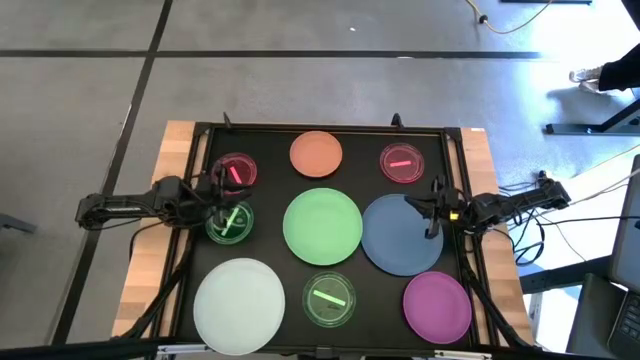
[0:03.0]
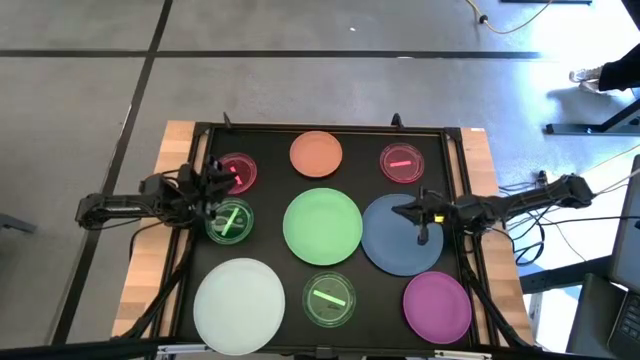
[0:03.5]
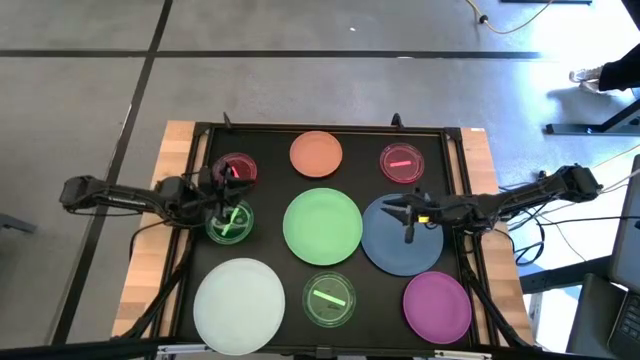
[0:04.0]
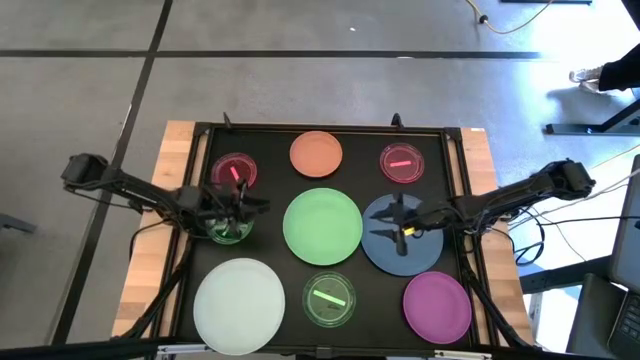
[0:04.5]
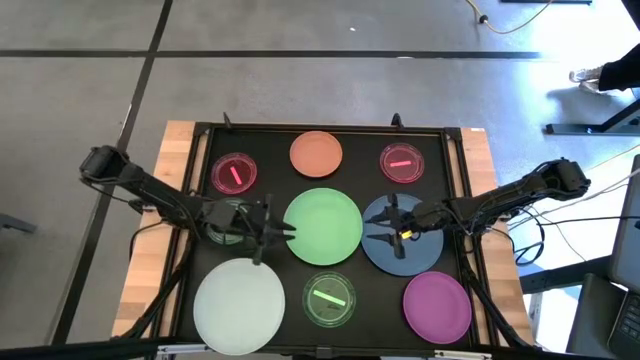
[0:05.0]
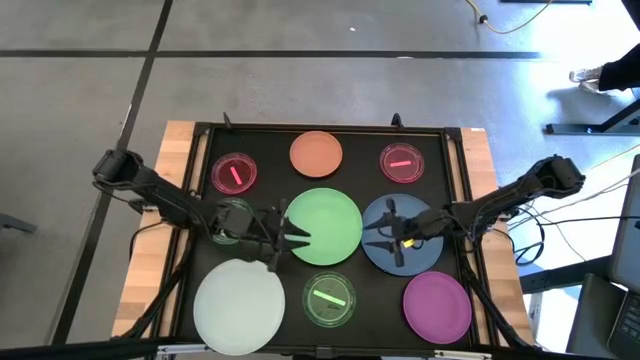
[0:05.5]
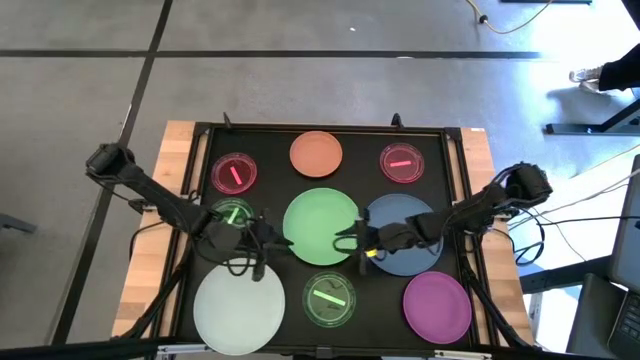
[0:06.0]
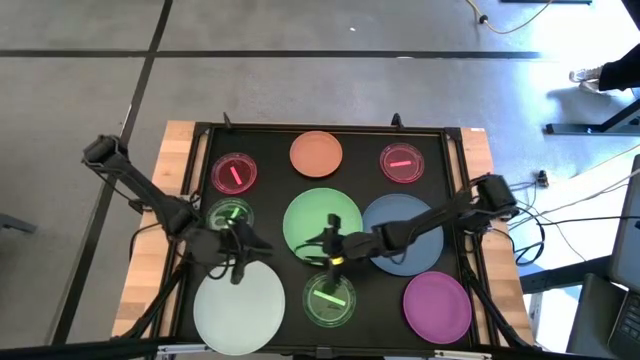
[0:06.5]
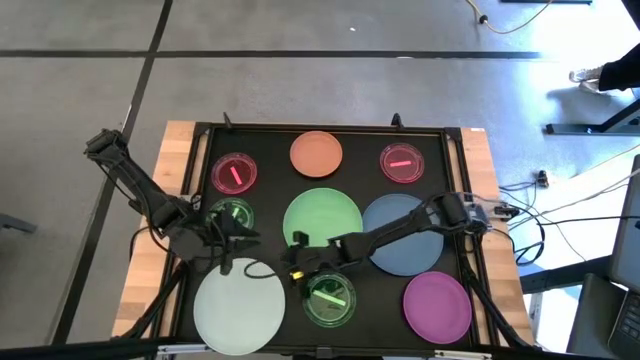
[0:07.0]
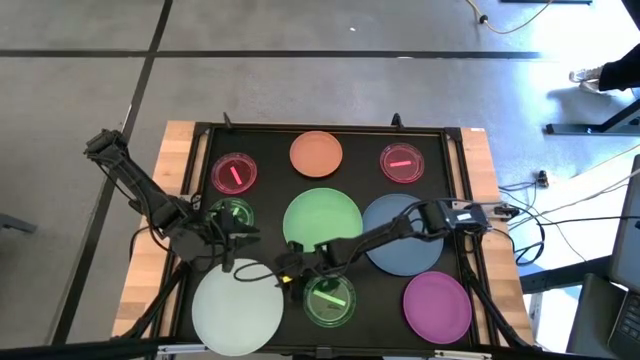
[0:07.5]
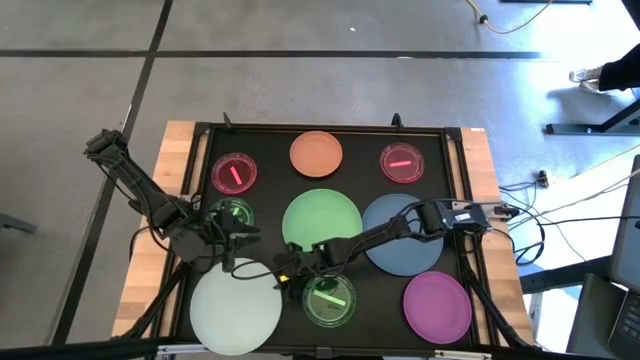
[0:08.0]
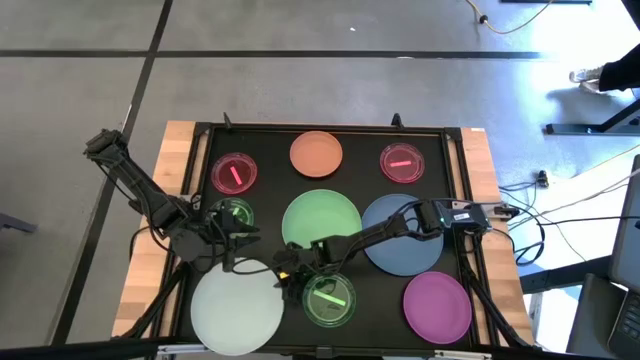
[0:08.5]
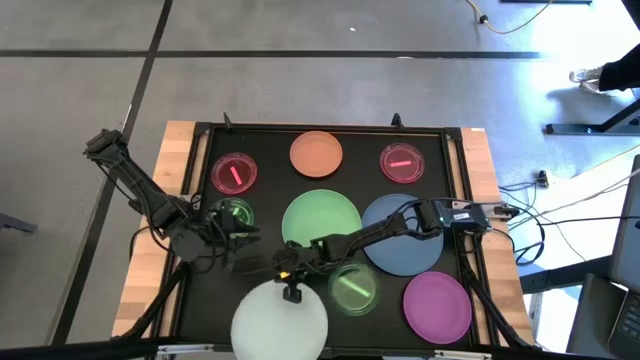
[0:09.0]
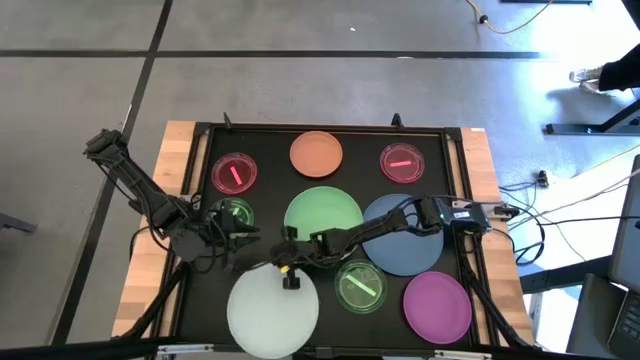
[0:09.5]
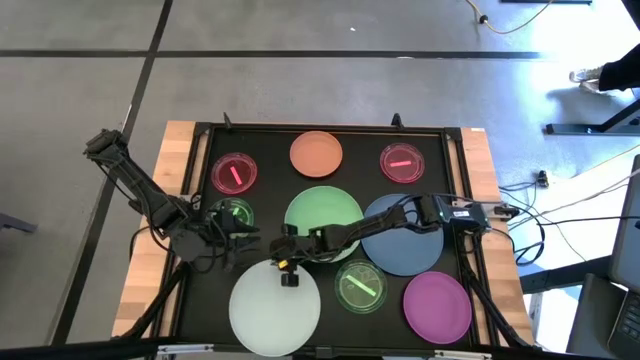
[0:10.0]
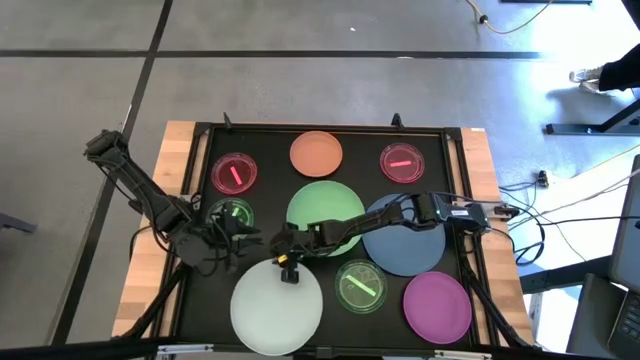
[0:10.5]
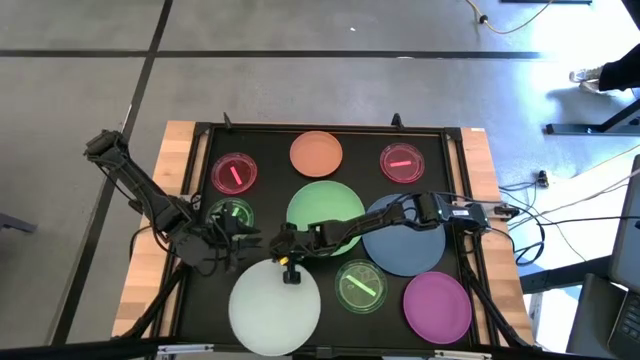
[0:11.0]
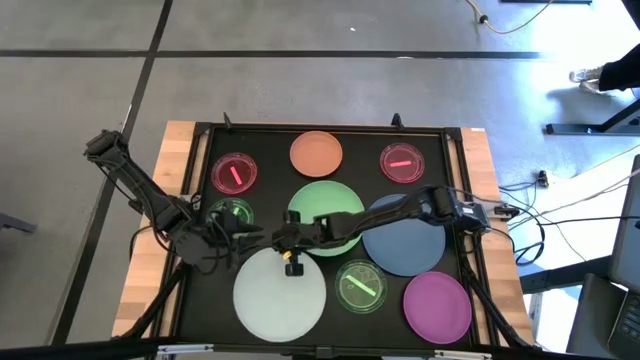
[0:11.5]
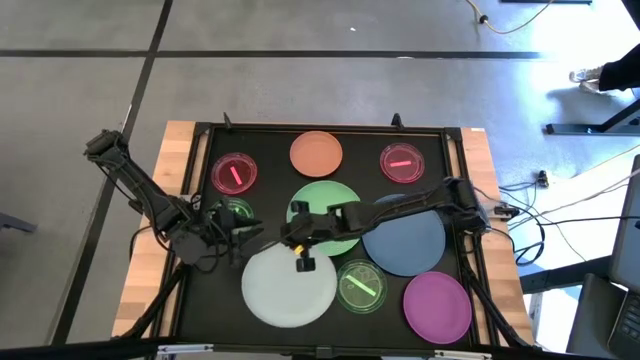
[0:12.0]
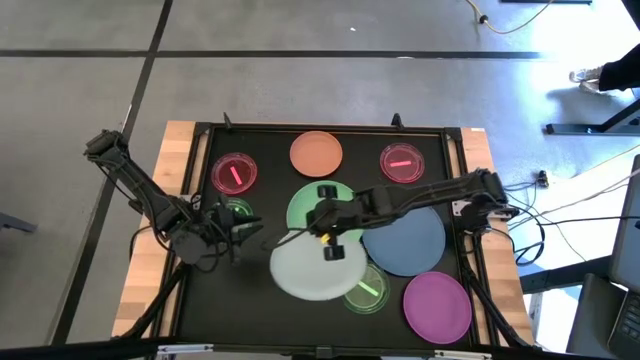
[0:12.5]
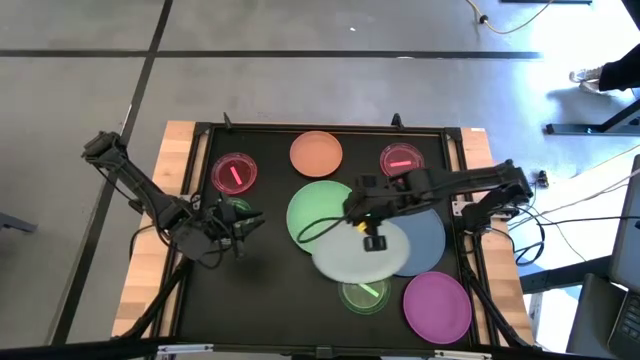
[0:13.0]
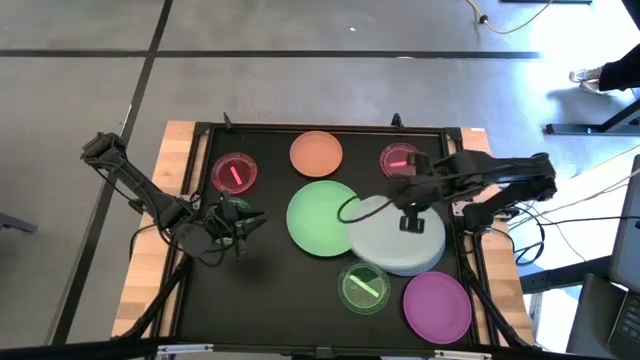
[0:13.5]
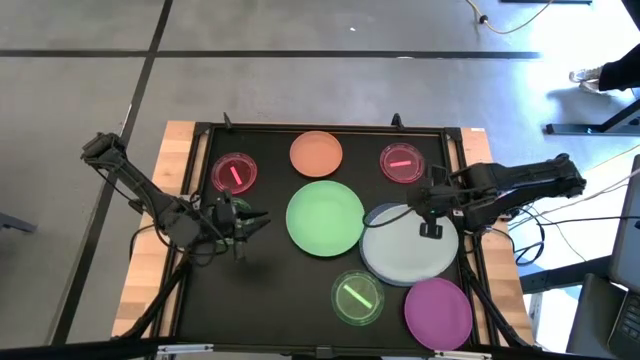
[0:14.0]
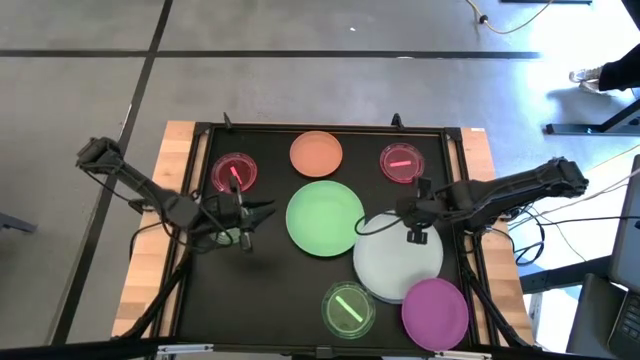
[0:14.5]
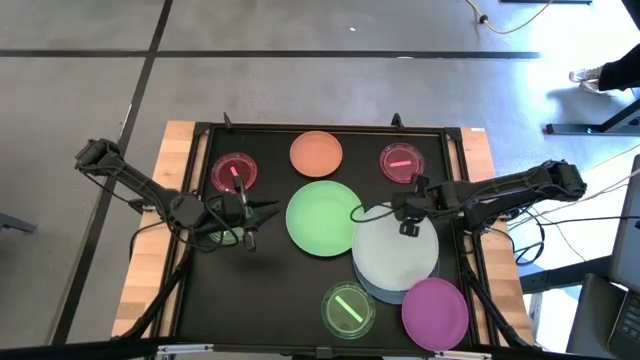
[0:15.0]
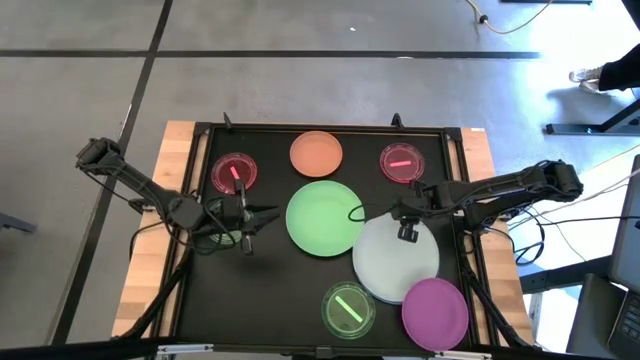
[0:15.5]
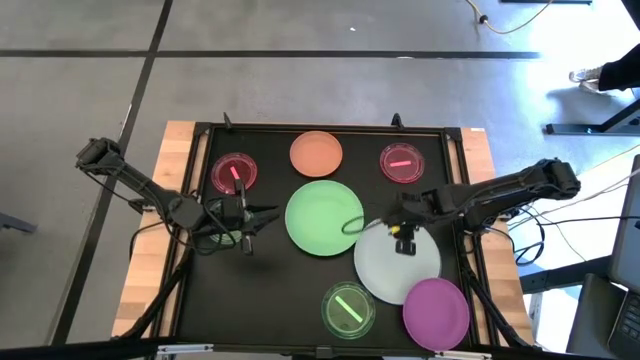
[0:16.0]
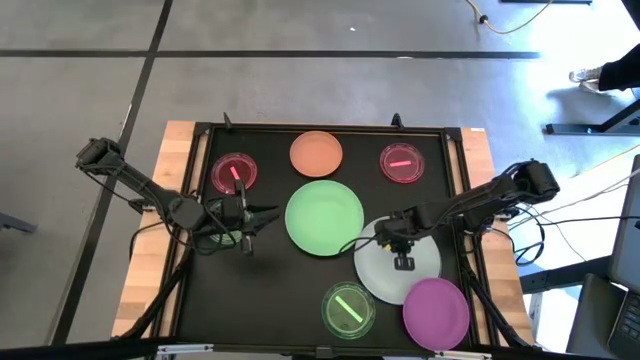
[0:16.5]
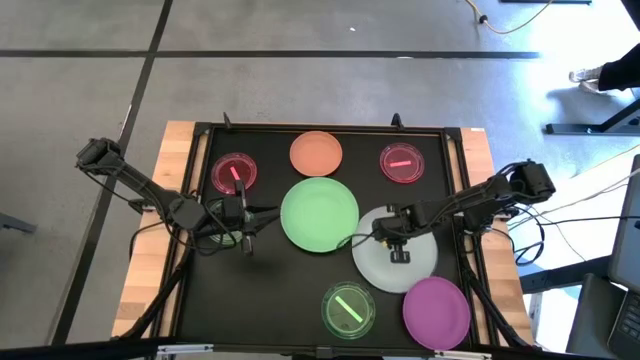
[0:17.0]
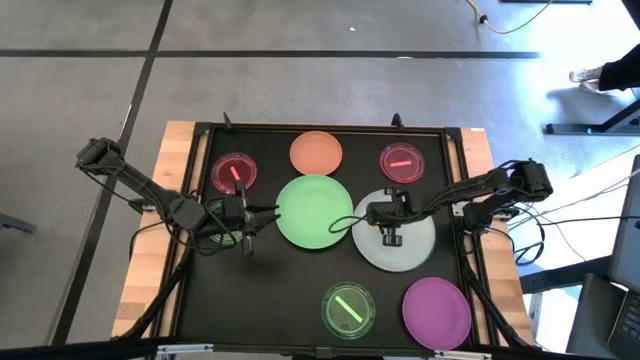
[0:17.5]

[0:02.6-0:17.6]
Task: Stack plastic plates
Stack the white plate on top of the blue plate

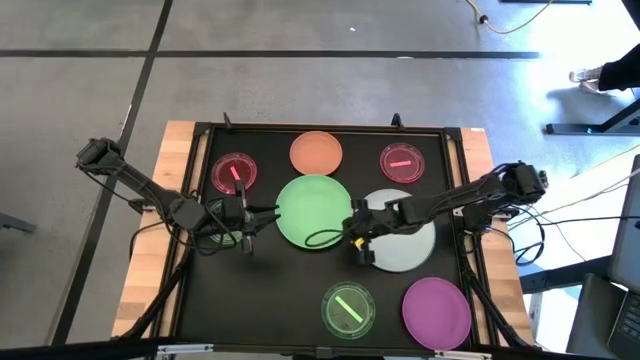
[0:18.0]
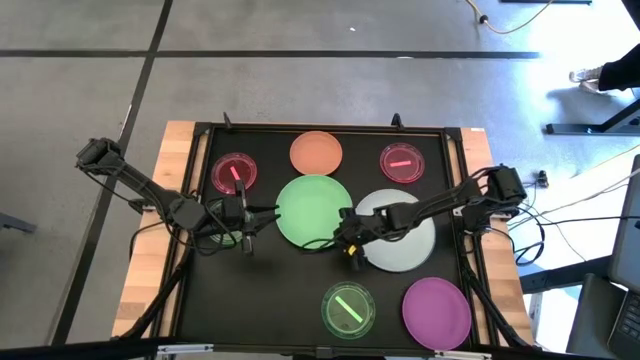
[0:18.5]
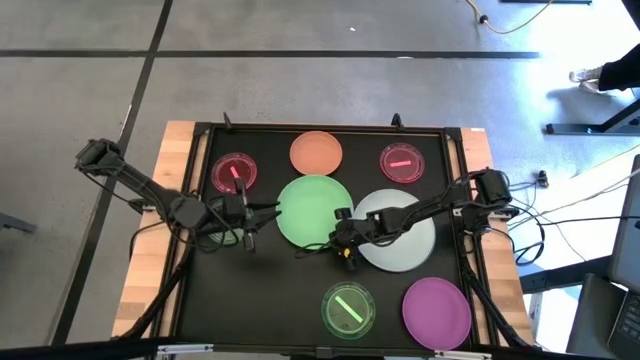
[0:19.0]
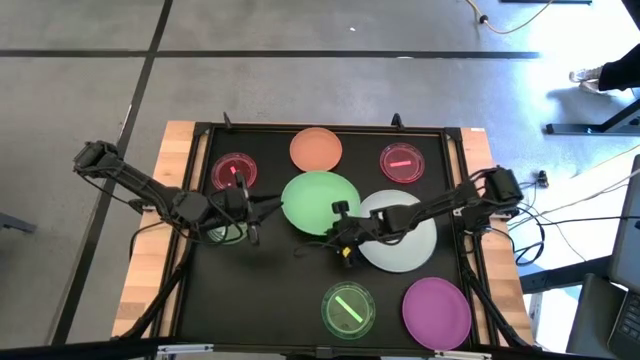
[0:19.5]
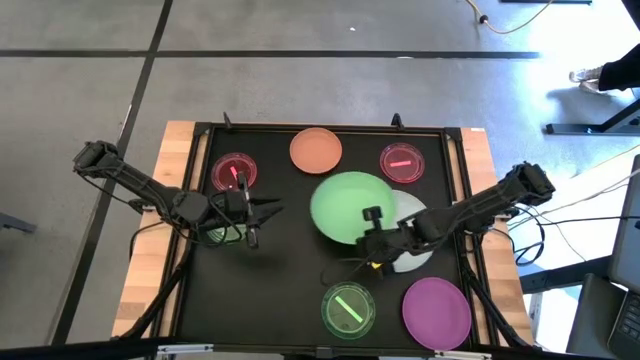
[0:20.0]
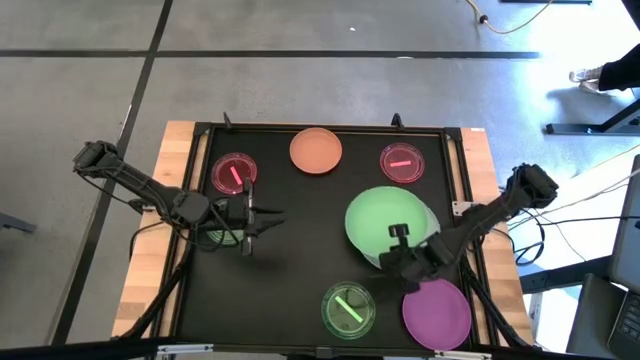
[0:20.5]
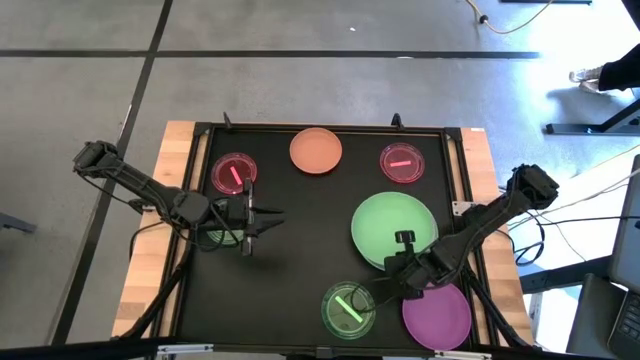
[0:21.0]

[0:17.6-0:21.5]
Stack the green plate on top of the white plate

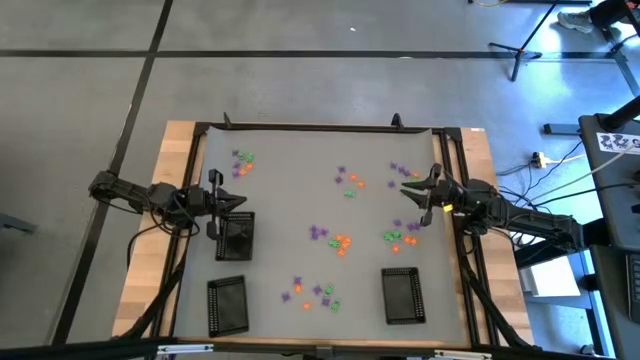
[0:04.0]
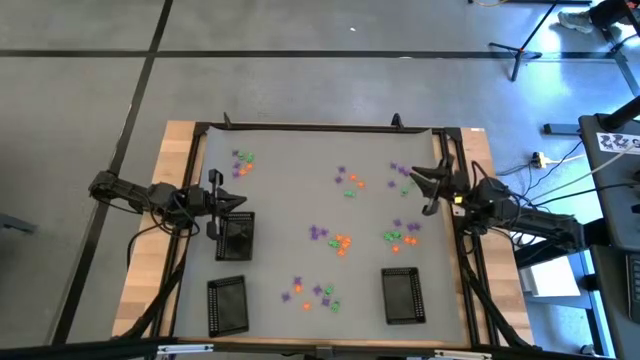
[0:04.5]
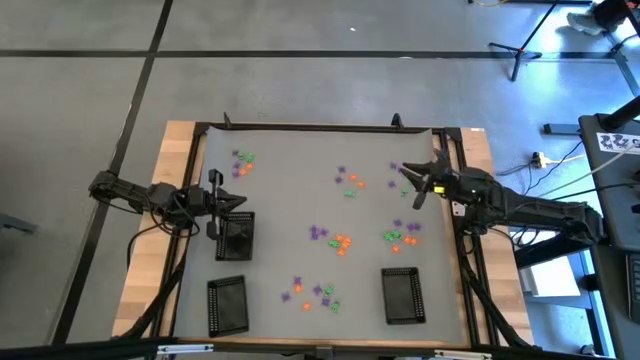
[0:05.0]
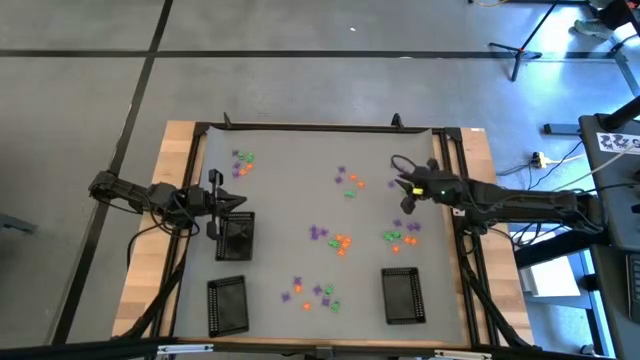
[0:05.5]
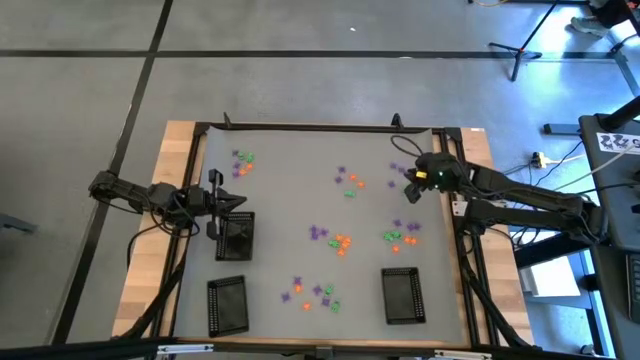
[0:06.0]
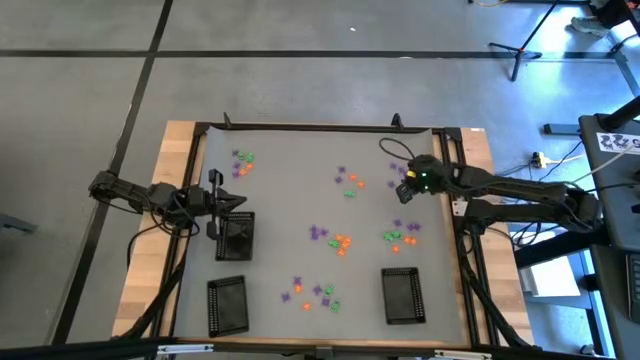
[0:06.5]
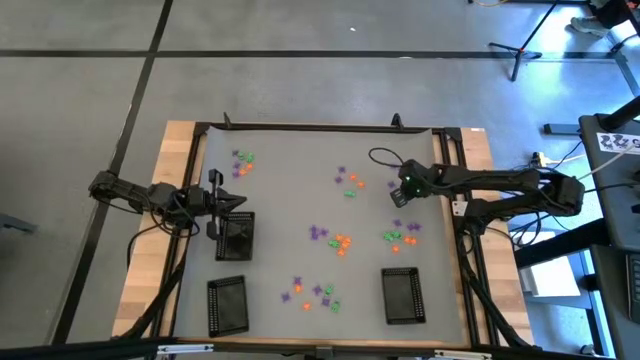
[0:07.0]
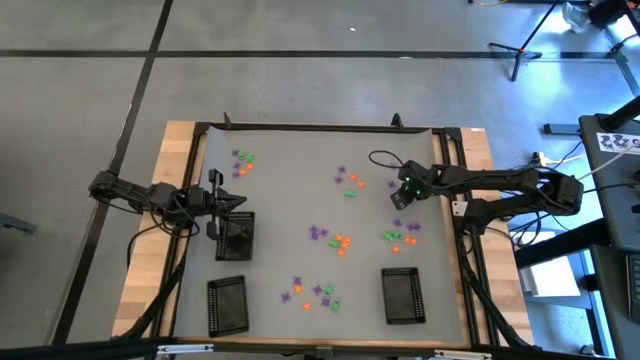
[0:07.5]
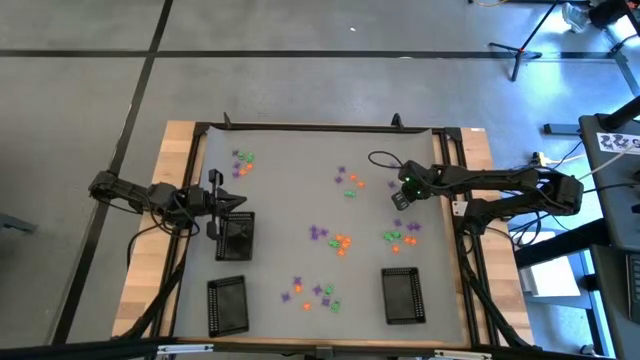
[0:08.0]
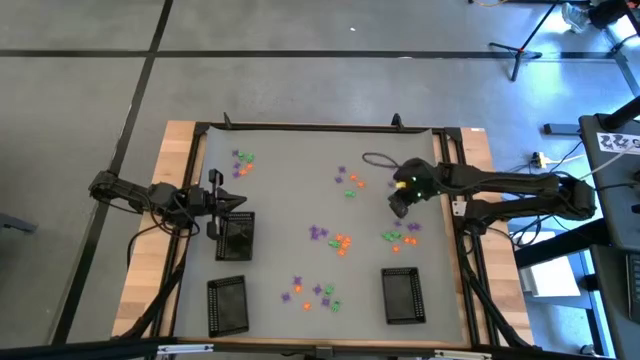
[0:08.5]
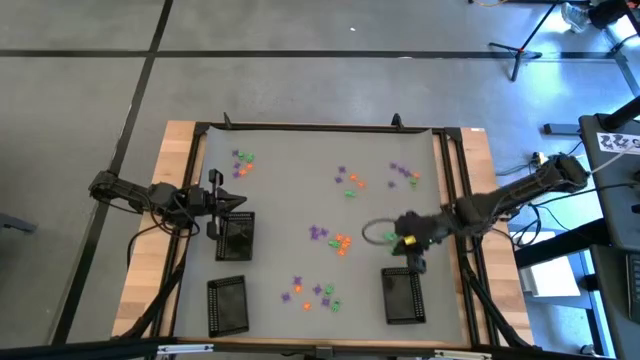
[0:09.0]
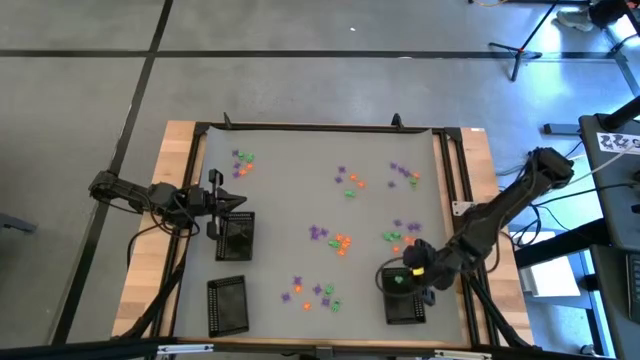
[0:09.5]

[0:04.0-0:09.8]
Task: Sort Halloween decoration
Put the green skeleton toy into the bottom right black basket
